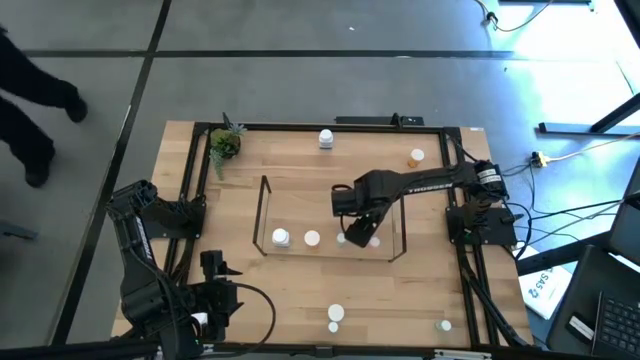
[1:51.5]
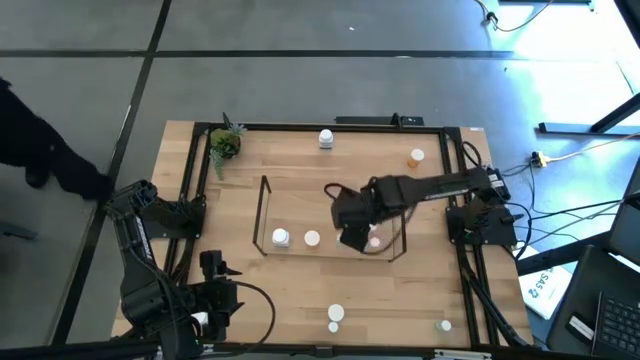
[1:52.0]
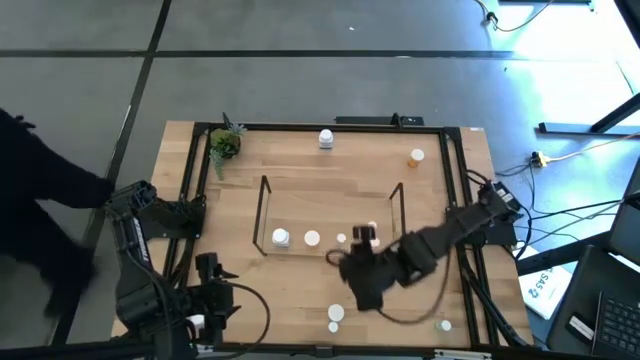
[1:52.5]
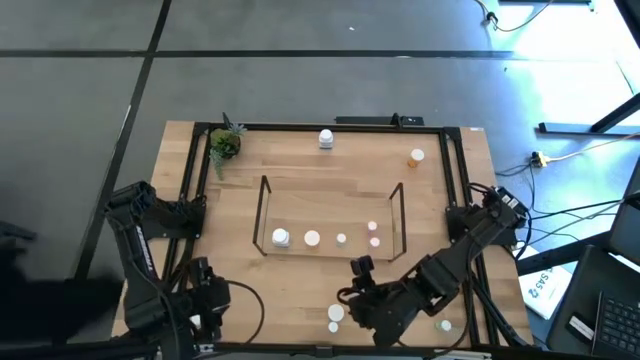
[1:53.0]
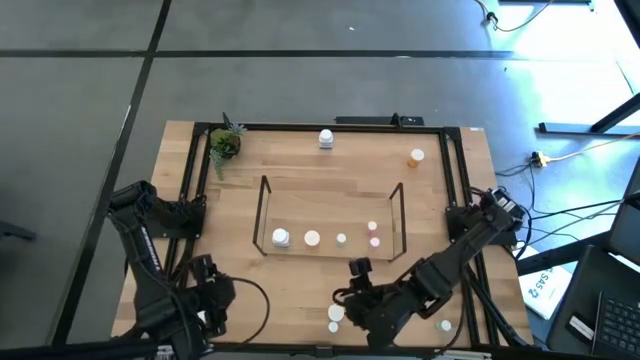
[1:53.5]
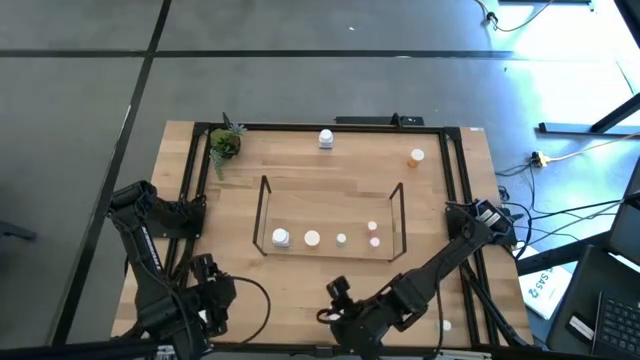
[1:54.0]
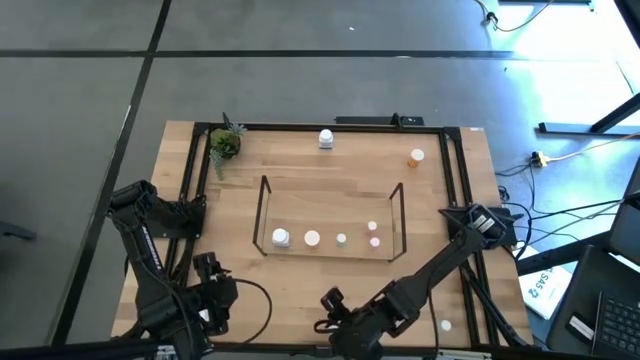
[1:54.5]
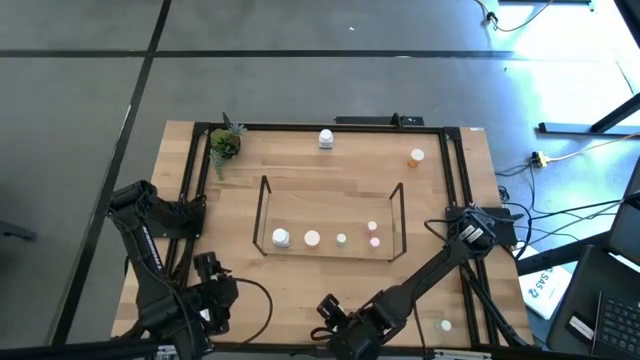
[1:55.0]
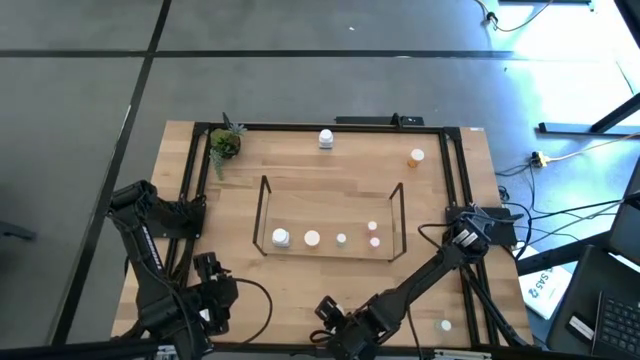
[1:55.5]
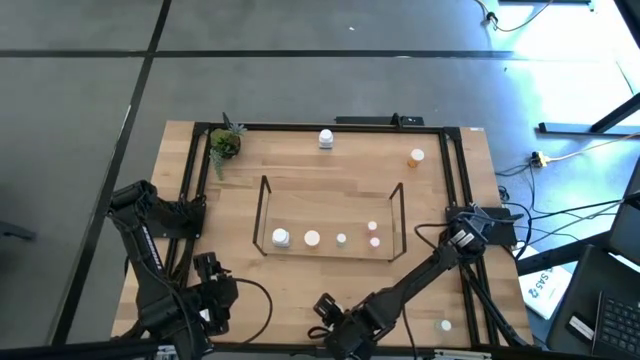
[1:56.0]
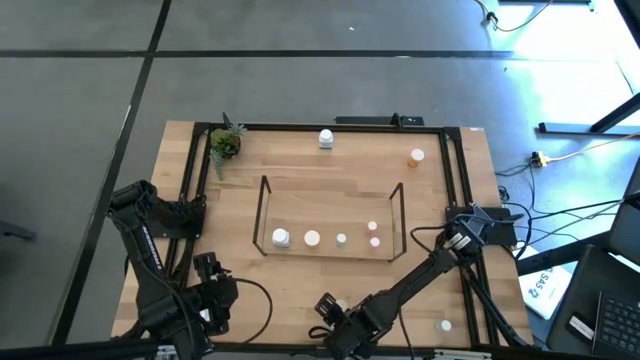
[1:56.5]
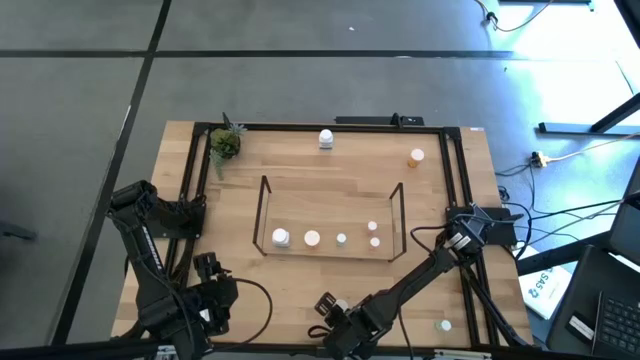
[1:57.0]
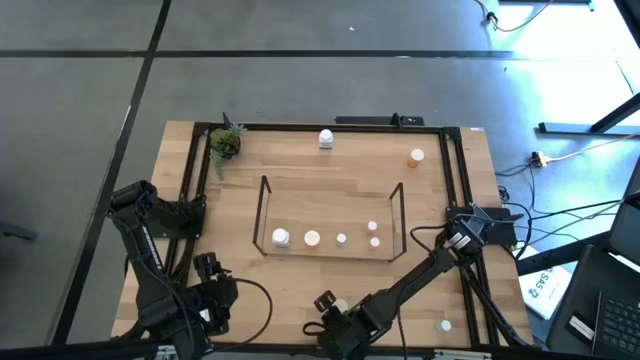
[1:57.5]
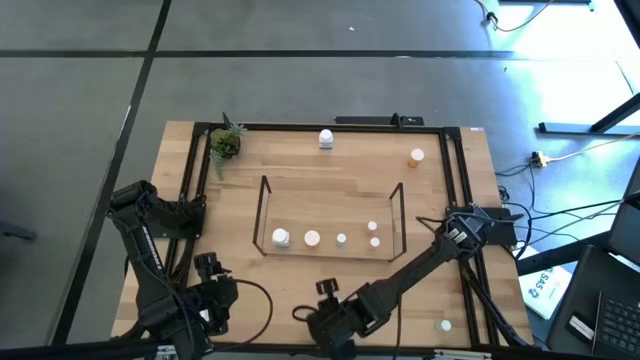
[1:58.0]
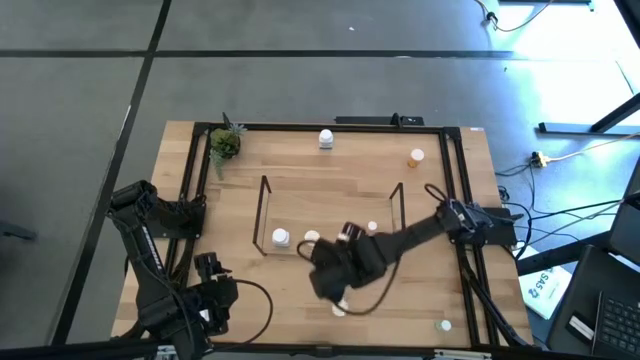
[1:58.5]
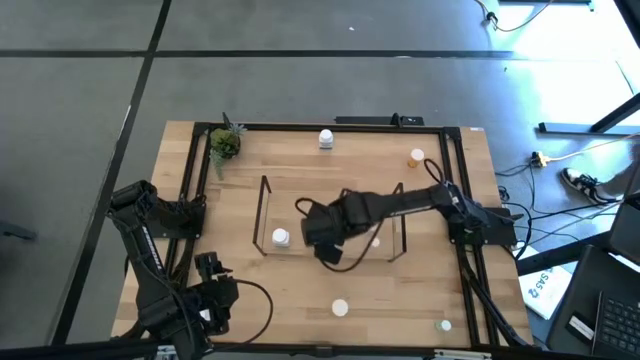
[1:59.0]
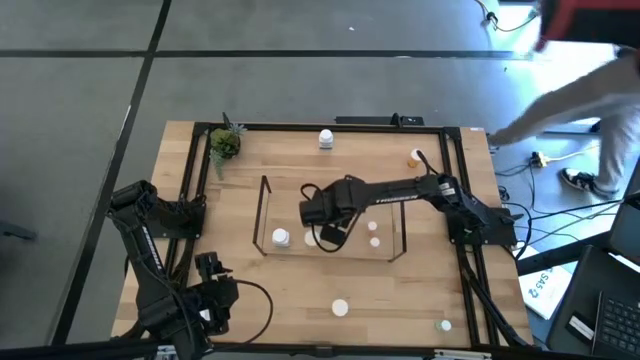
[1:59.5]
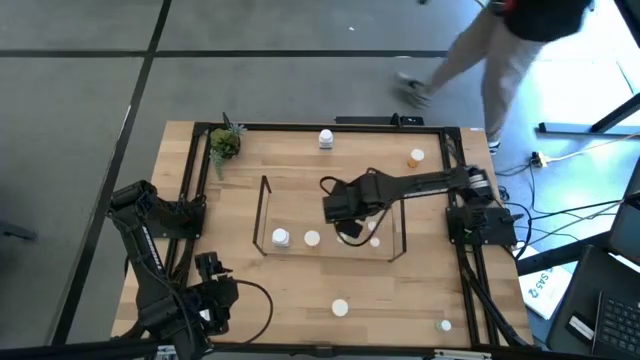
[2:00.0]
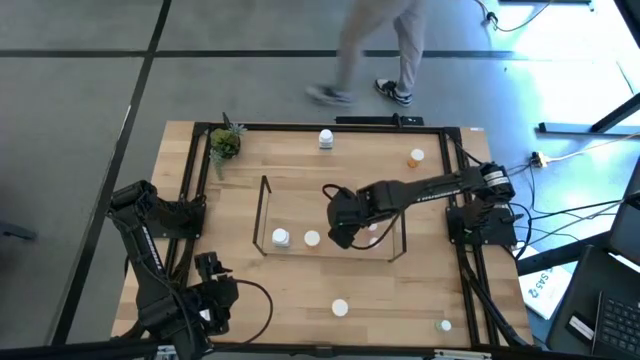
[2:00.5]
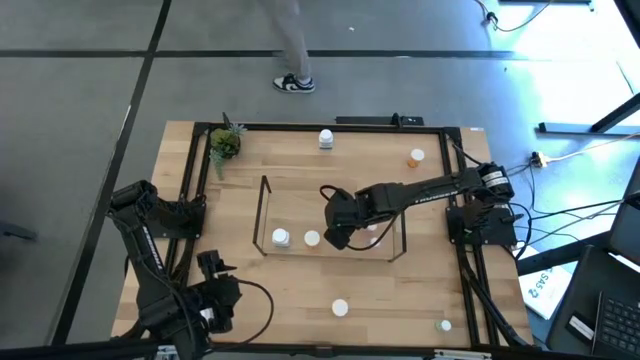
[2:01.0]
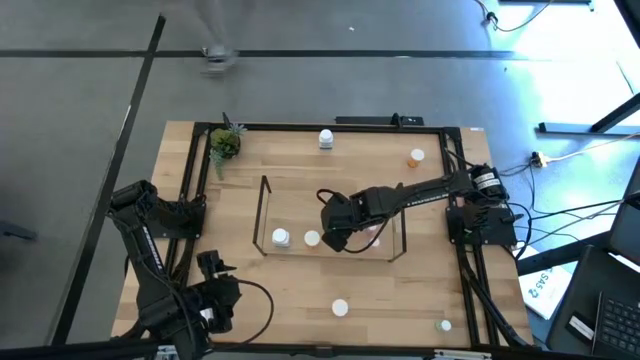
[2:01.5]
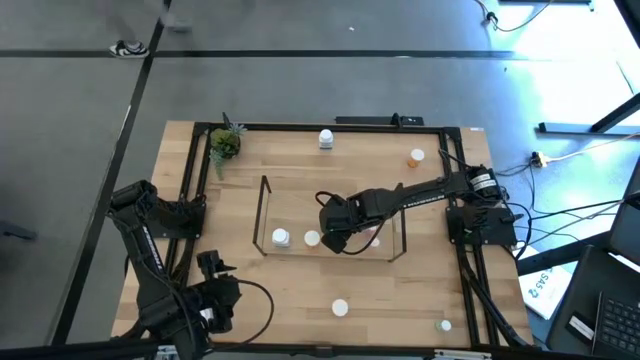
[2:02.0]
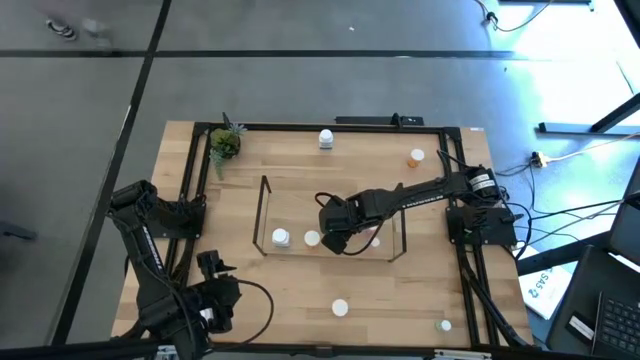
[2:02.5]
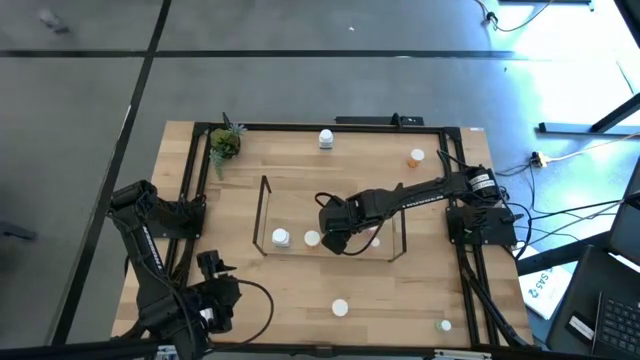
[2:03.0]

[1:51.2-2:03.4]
Task: Pick and place medicine bottles onto shelf by color
Put the bottom left light blue pill bottle on the shelf aligned with the other light blue pill bottle

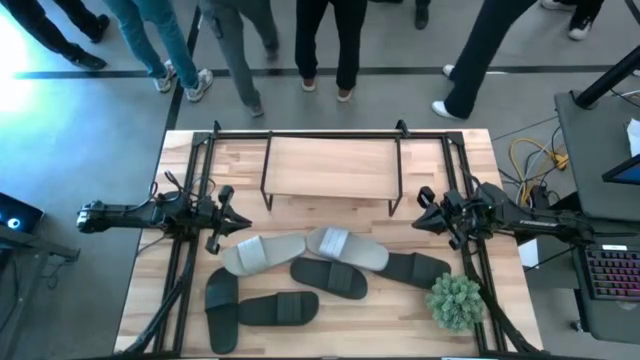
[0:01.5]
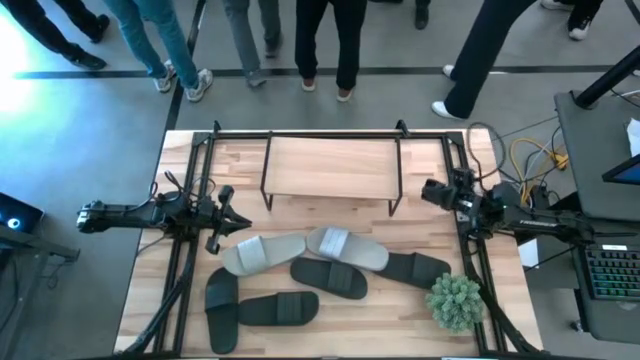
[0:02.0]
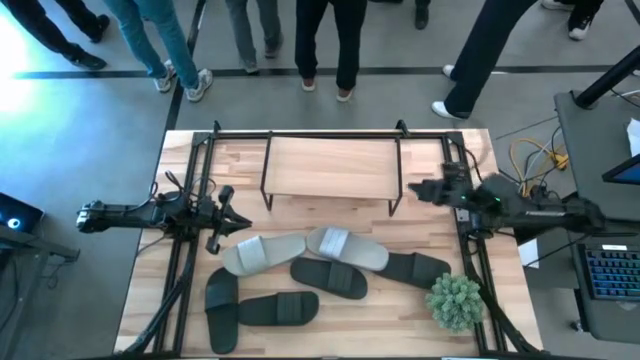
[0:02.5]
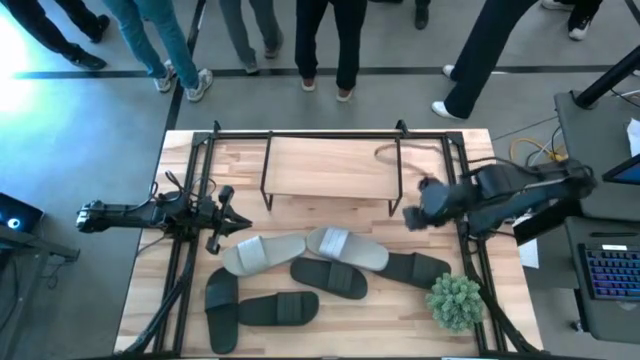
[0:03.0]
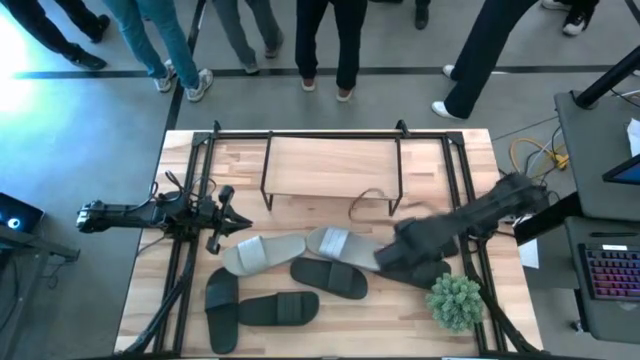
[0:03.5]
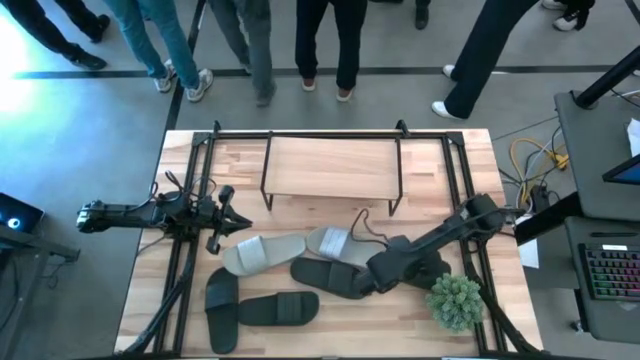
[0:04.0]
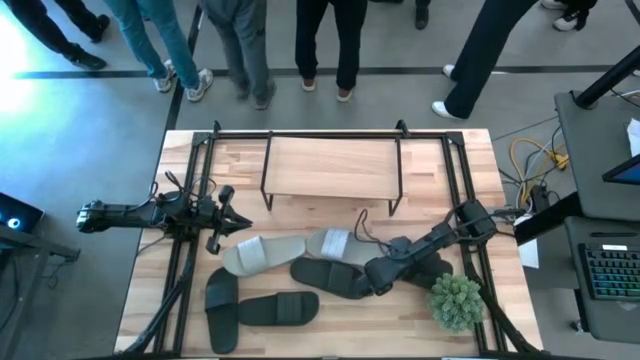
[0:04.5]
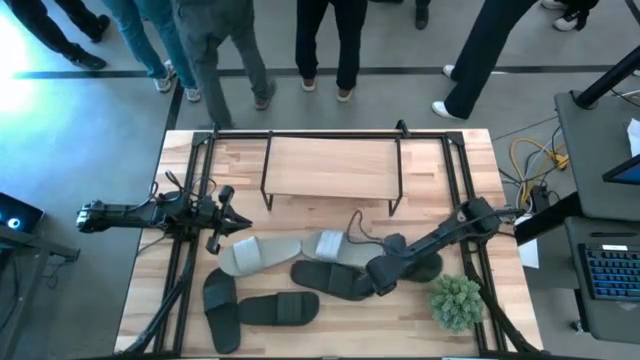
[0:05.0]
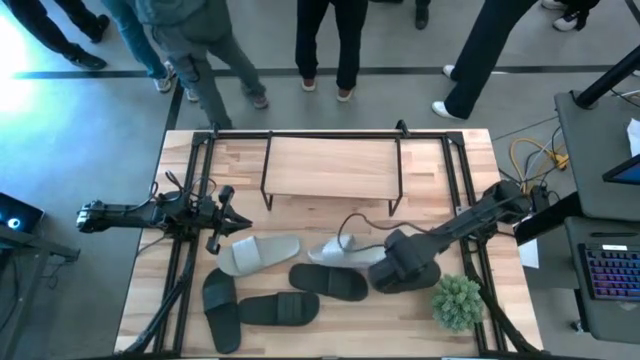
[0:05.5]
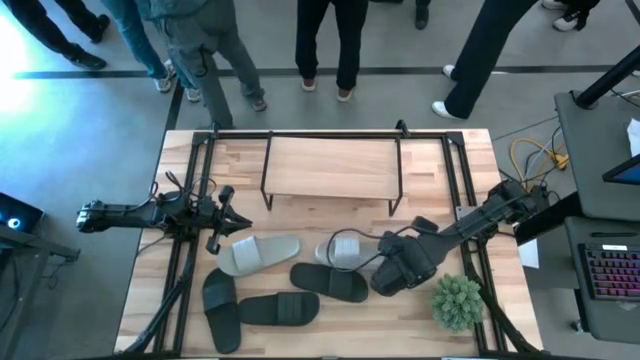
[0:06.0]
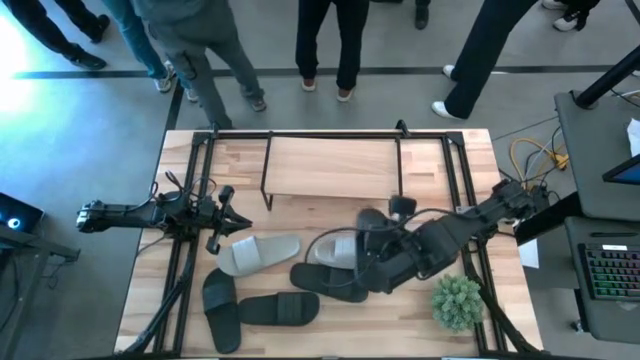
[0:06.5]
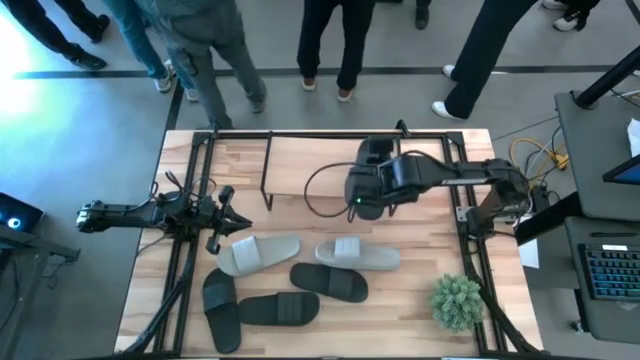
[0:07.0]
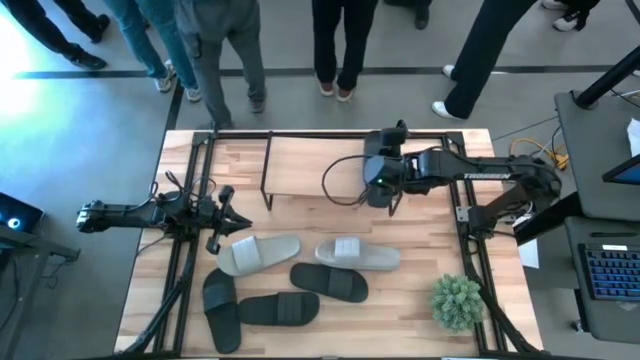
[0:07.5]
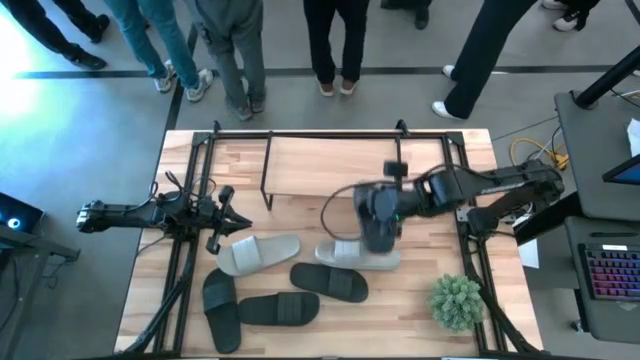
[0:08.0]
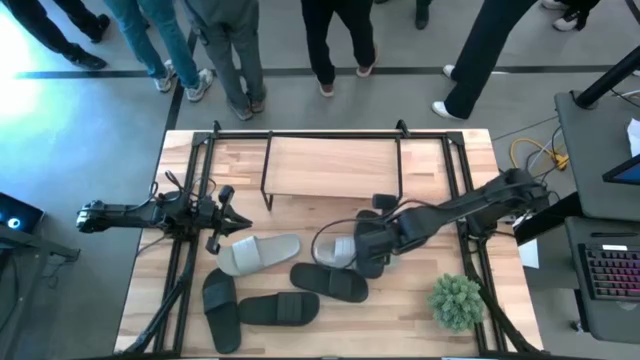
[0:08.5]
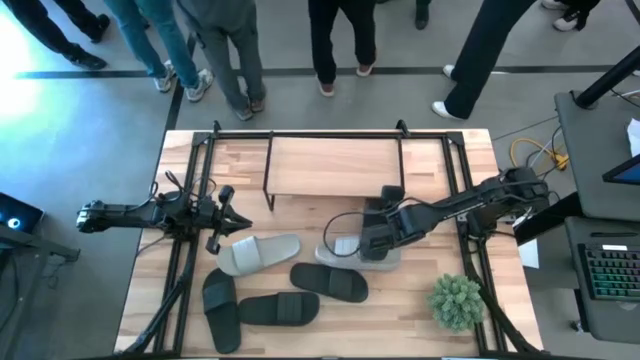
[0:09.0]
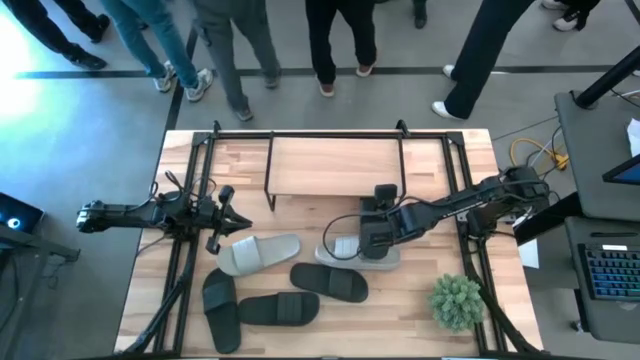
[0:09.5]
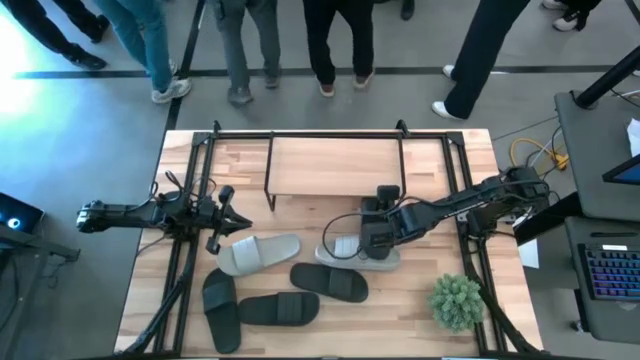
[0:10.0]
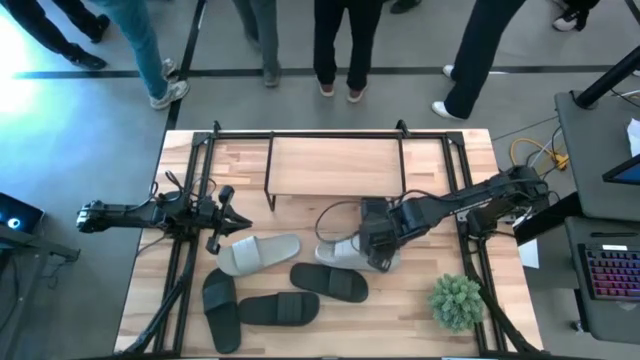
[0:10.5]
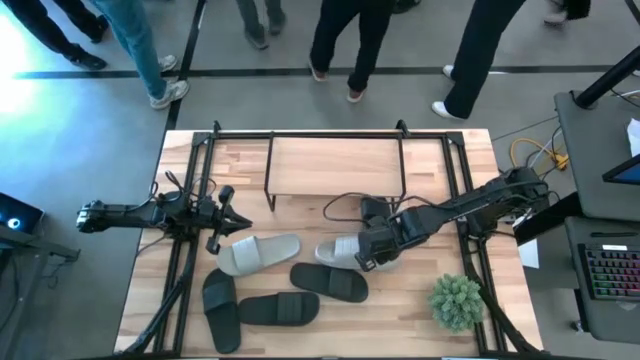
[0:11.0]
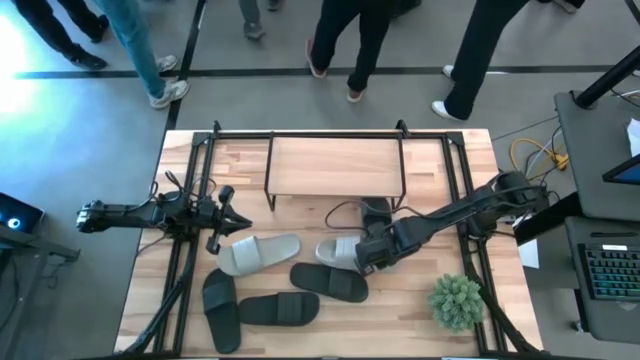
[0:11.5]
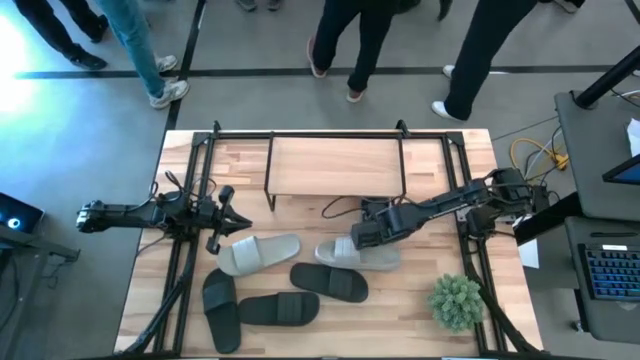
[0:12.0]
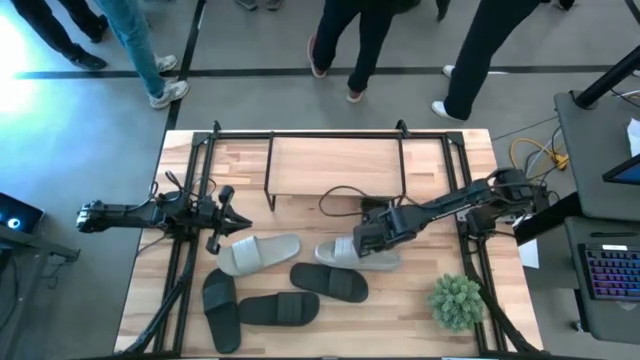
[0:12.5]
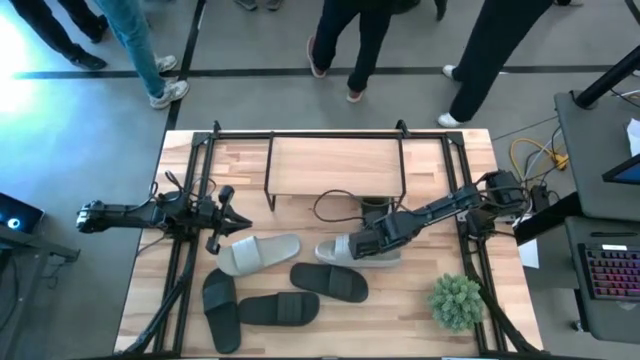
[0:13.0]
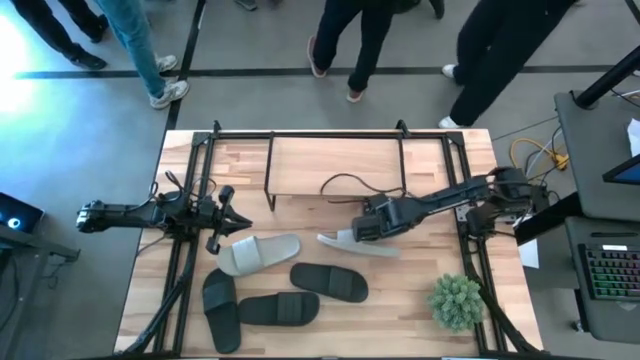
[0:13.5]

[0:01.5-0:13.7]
Task: Pick and place slides into the shelf
Put the black slipper under the shelf
